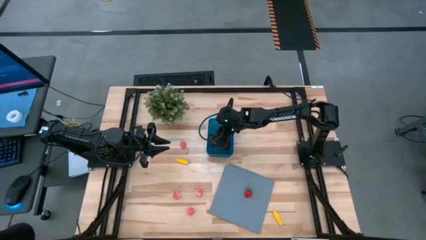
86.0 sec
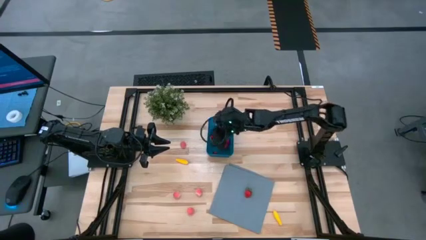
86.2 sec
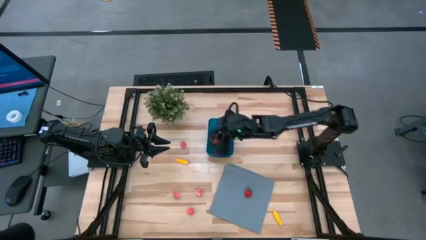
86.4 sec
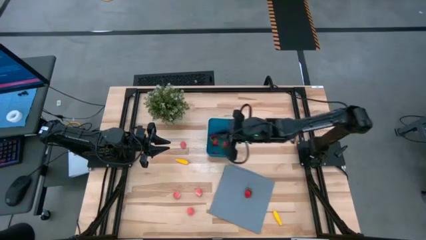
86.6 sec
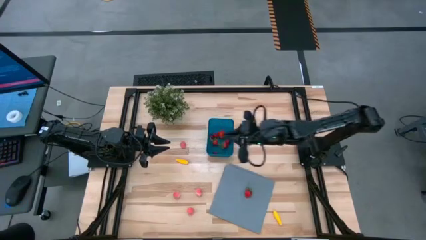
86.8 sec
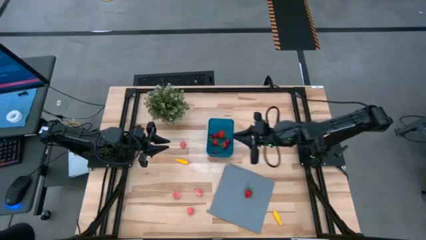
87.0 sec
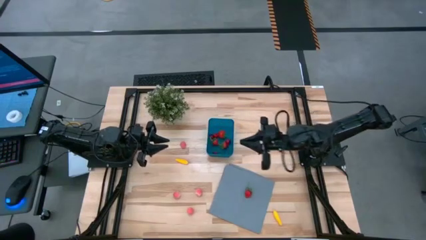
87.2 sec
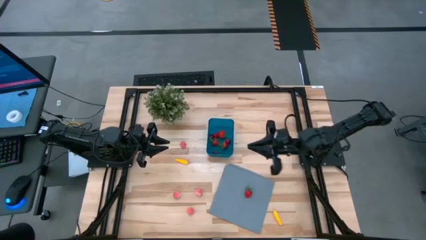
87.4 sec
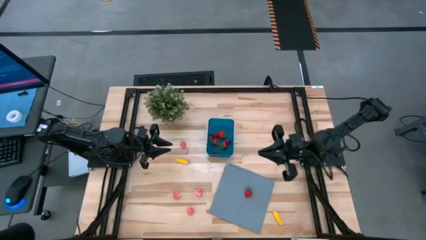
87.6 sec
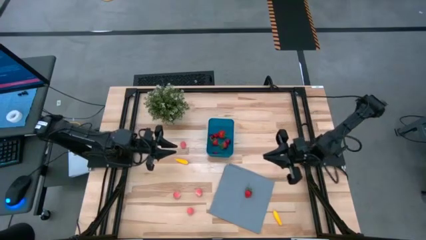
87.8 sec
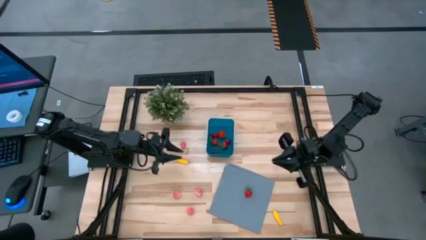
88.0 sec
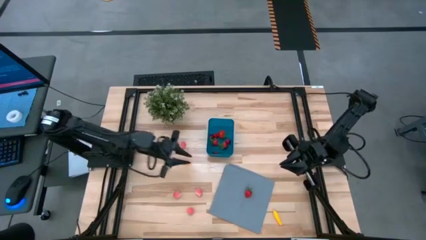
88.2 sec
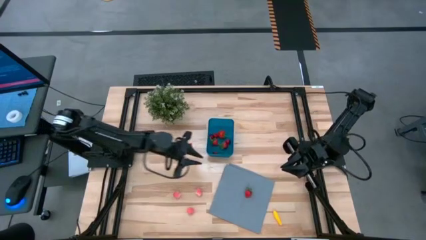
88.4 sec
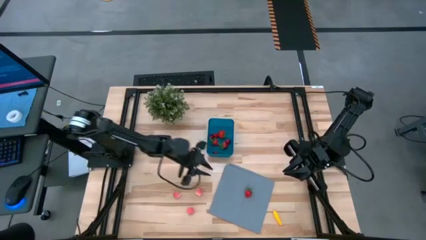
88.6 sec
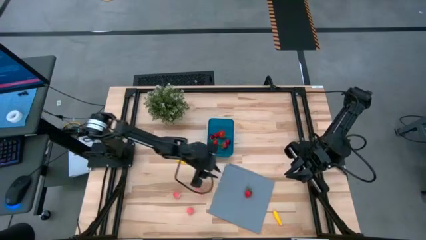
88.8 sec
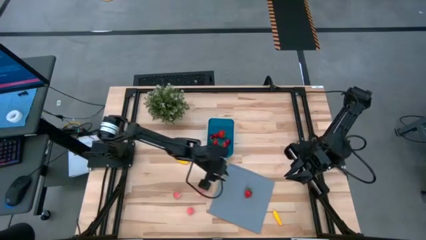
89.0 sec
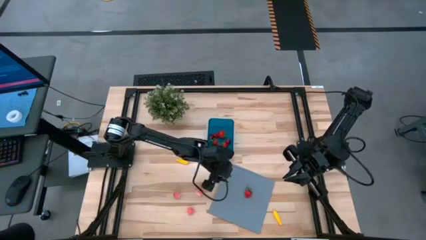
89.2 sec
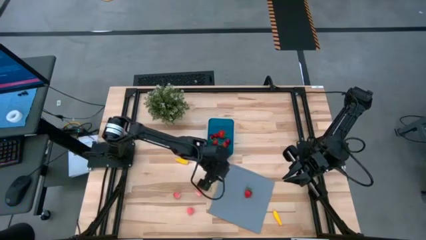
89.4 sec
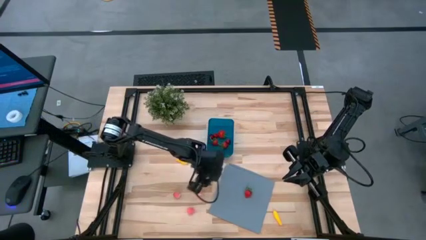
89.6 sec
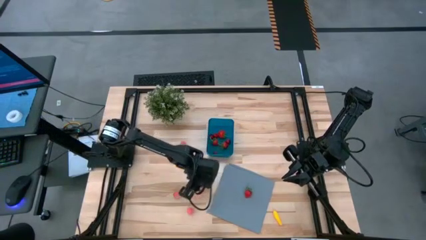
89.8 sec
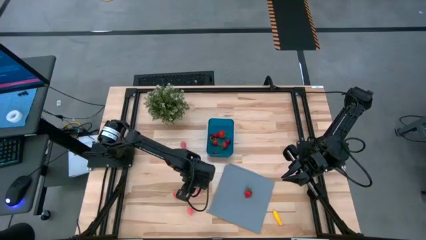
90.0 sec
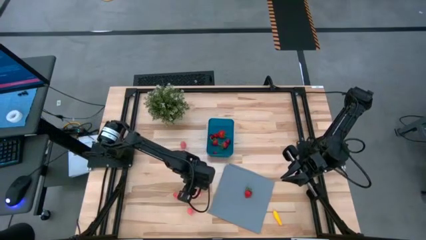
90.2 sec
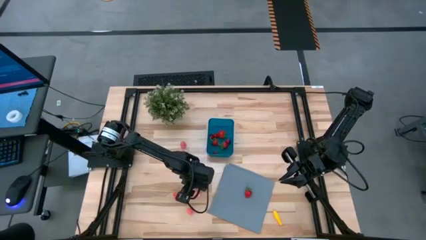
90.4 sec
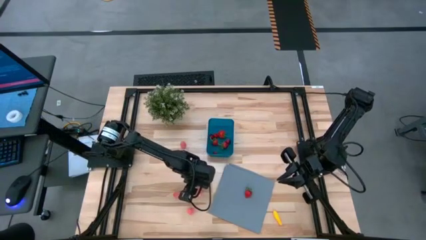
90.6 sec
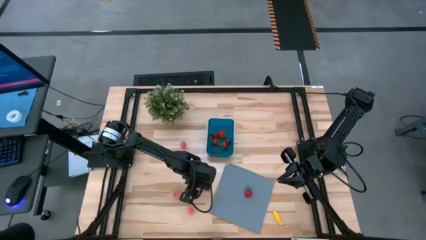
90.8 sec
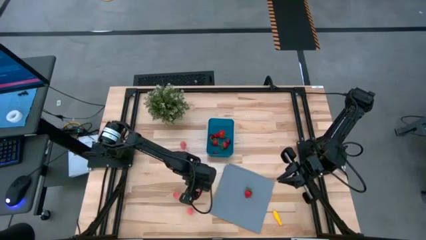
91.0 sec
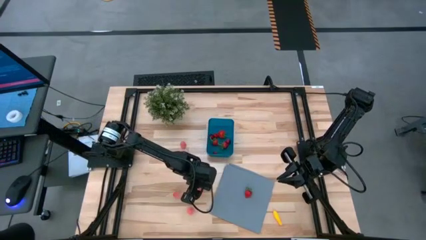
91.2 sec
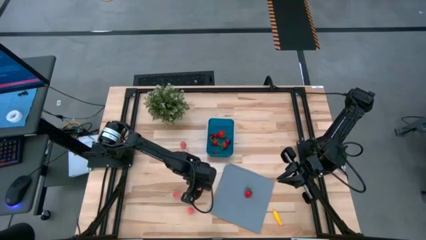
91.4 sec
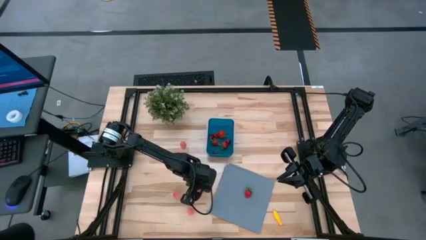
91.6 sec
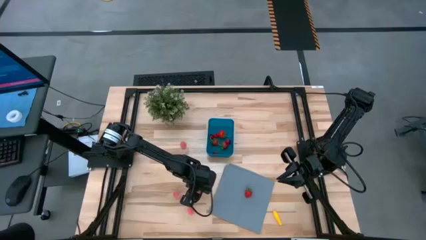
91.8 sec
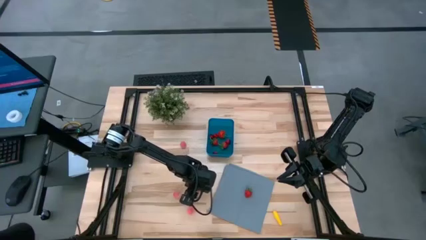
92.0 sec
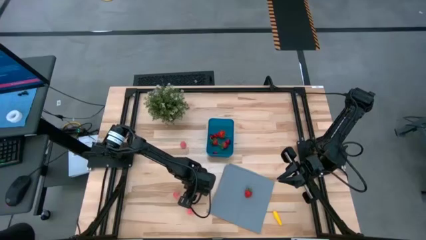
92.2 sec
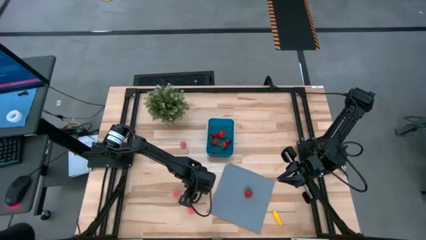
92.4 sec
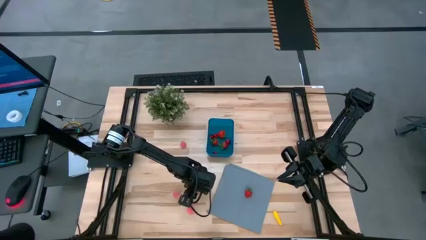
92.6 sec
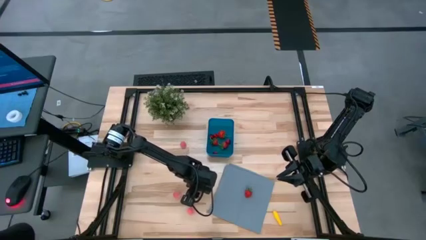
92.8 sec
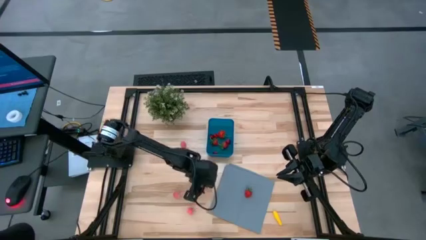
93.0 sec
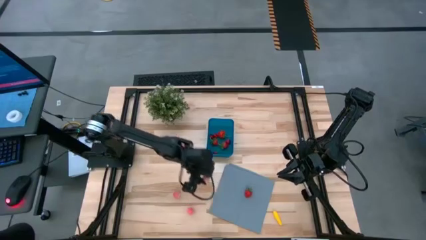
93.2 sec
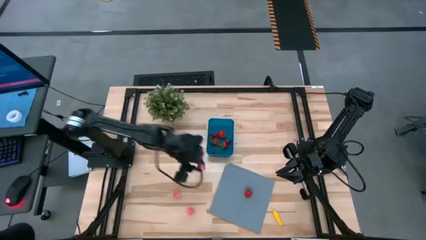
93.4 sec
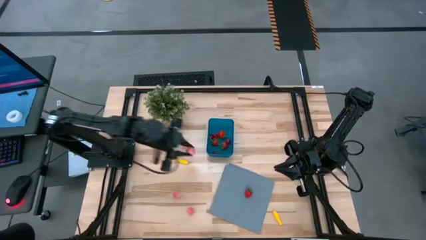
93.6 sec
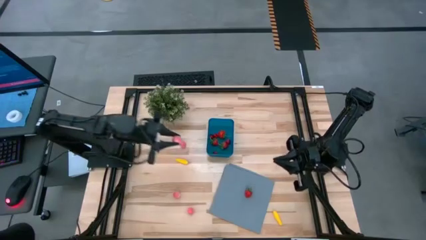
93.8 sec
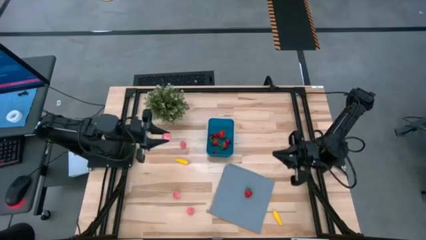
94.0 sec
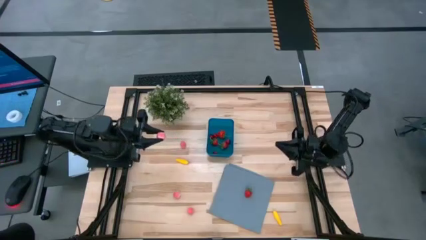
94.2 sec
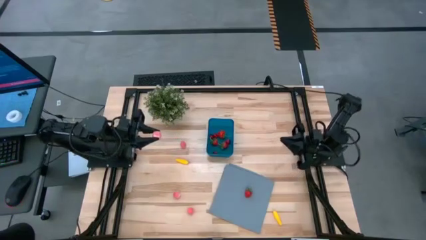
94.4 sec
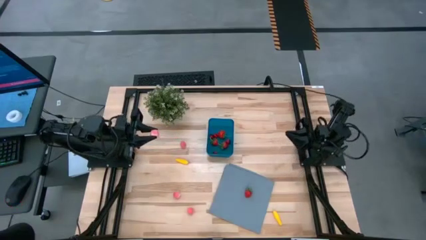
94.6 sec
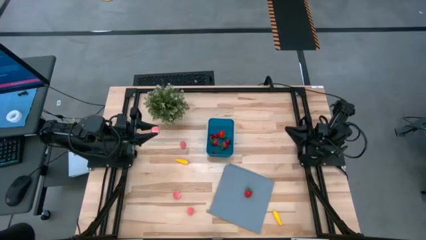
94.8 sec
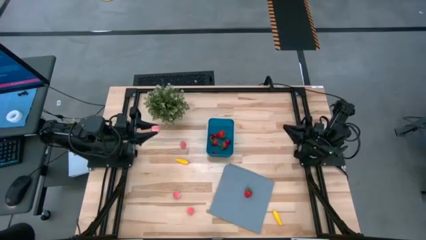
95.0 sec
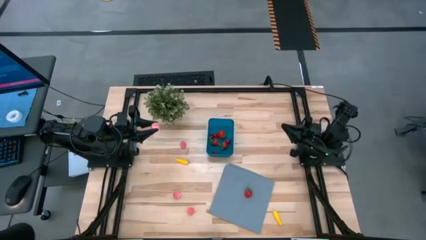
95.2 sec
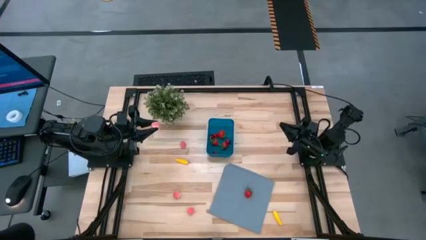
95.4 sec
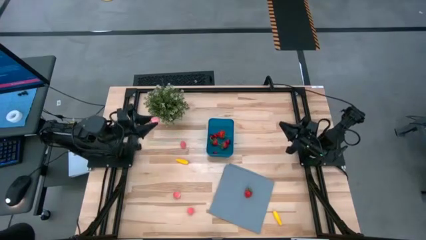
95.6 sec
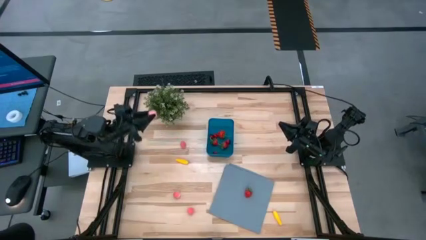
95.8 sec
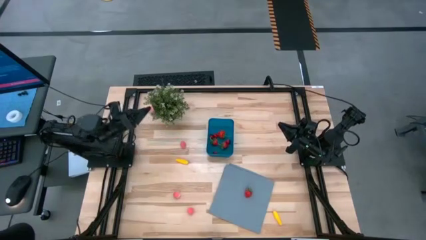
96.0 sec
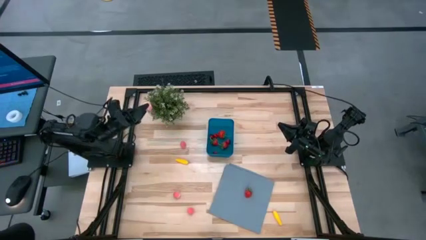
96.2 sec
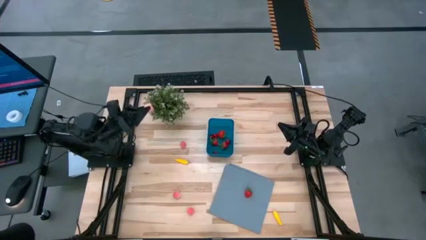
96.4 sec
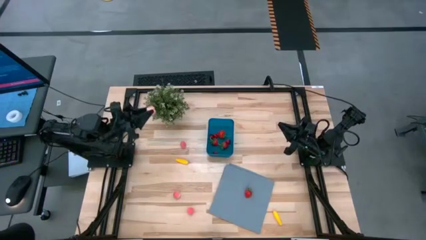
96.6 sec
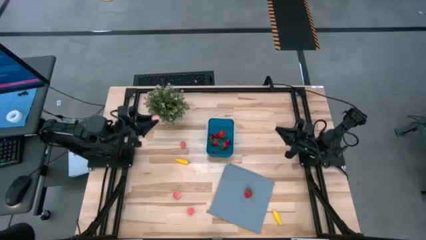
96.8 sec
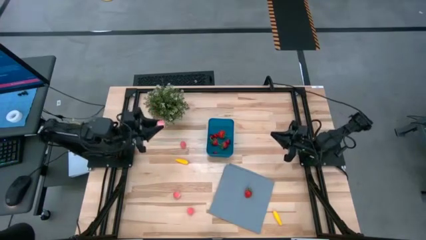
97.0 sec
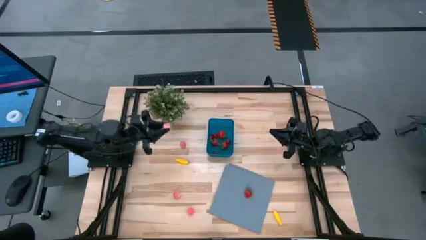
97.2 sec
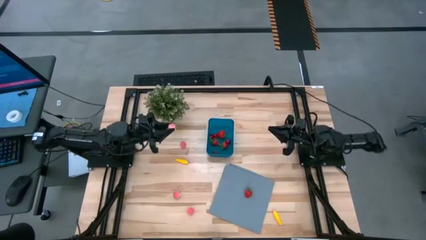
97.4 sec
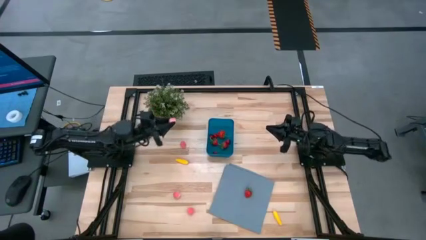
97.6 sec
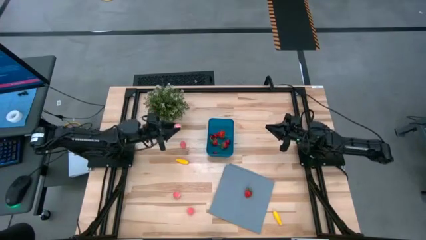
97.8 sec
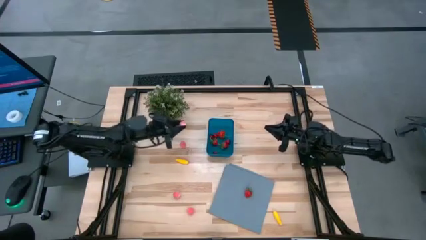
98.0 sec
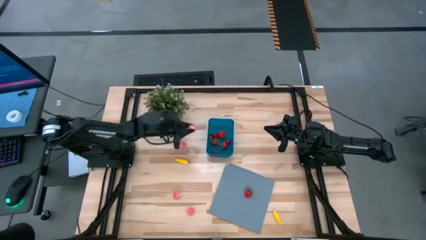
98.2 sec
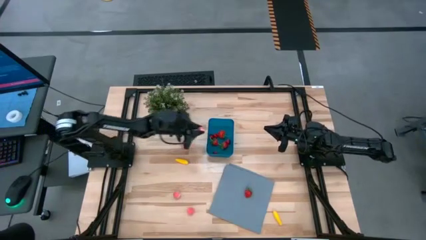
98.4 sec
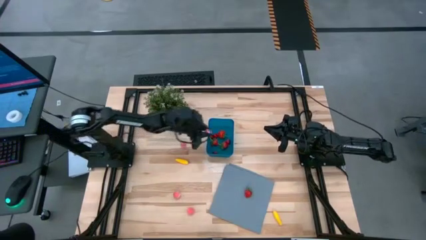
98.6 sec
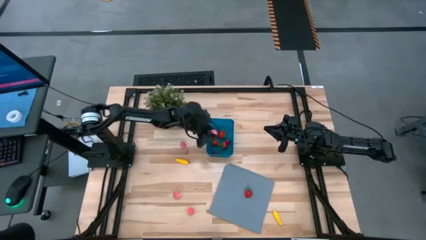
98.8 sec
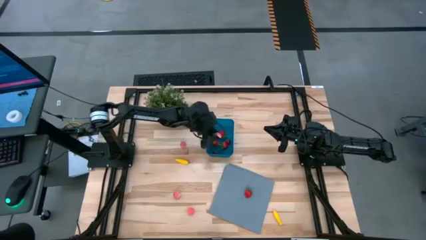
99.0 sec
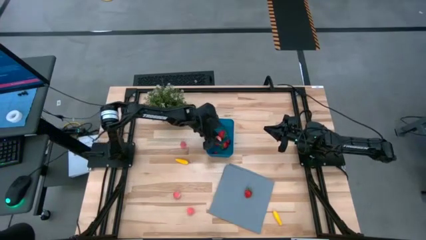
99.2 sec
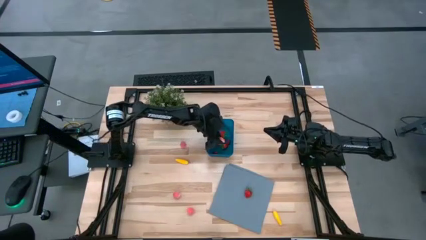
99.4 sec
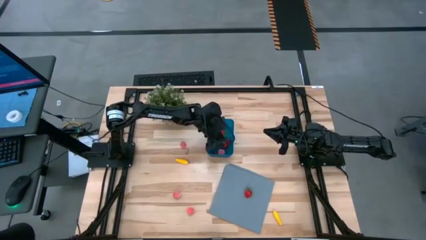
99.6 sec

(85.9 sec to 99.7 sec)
Task: Pick and placing Produce into tupperware
Put the peach into the blue bin

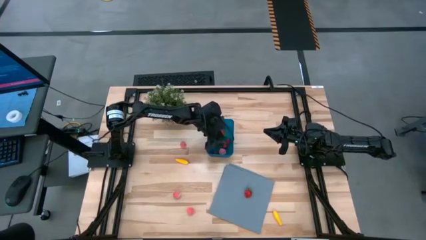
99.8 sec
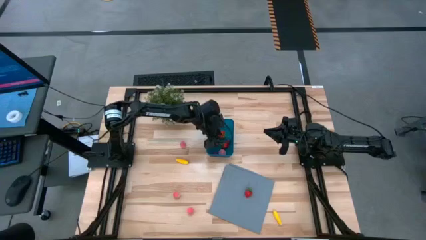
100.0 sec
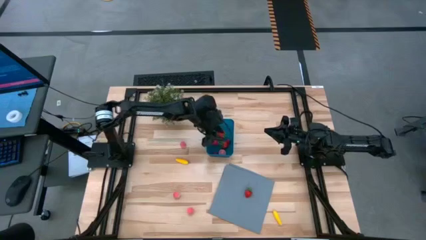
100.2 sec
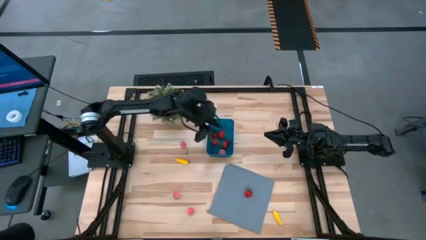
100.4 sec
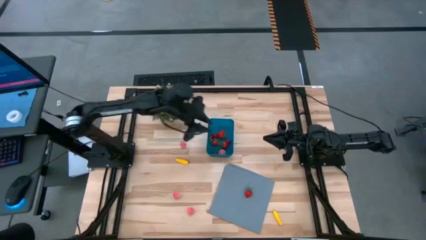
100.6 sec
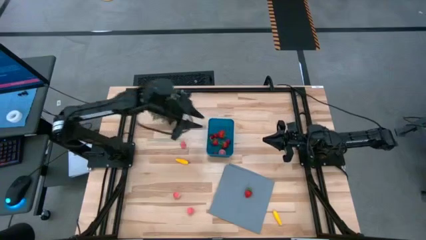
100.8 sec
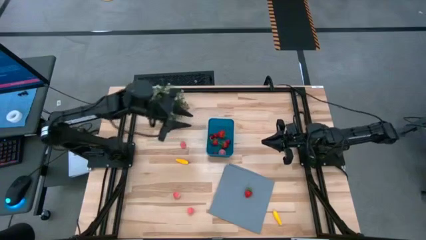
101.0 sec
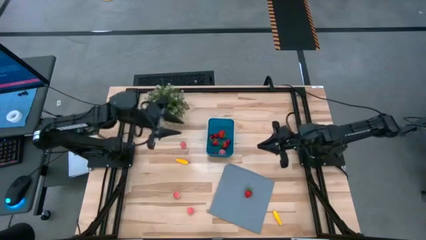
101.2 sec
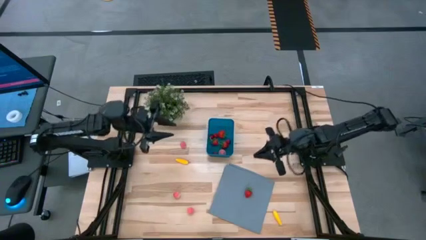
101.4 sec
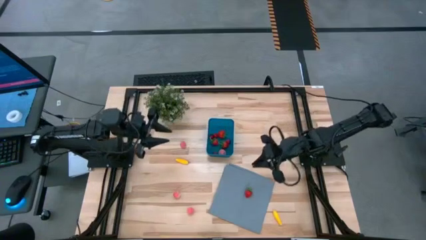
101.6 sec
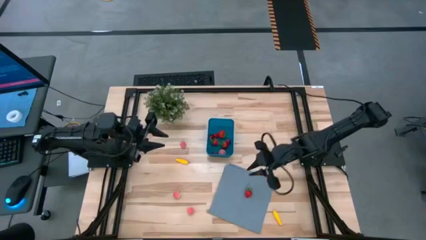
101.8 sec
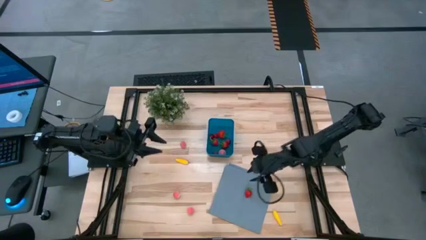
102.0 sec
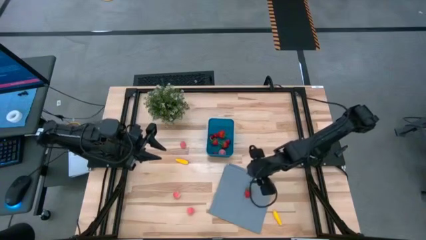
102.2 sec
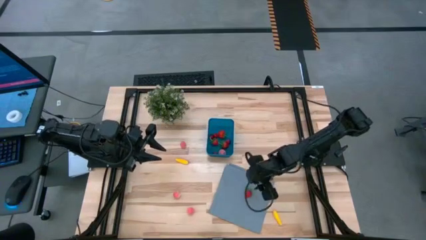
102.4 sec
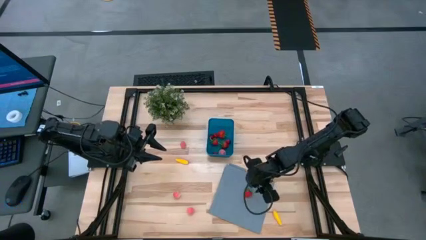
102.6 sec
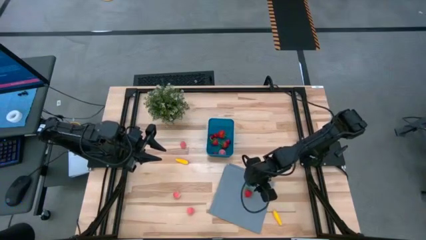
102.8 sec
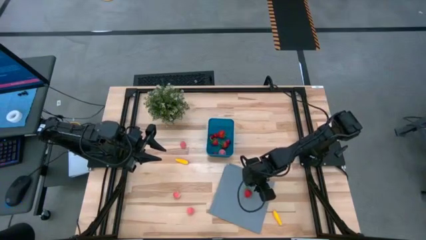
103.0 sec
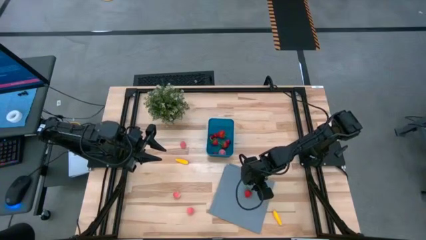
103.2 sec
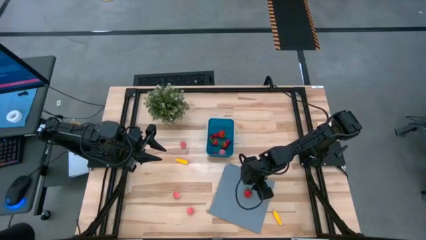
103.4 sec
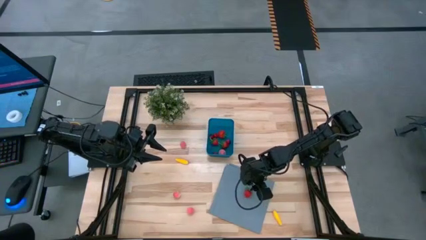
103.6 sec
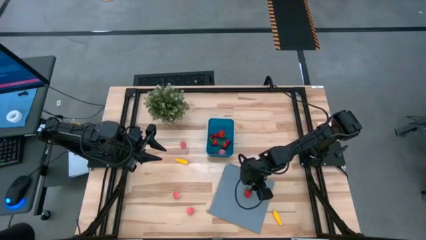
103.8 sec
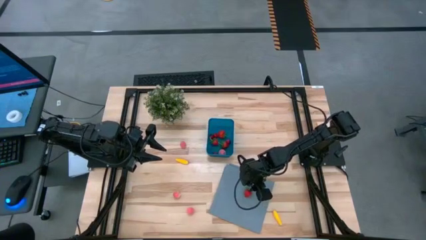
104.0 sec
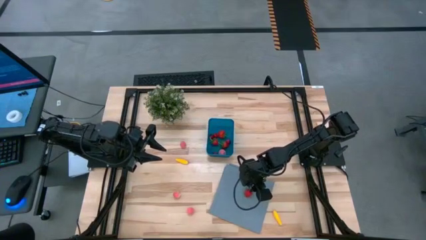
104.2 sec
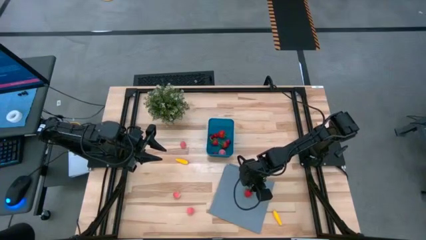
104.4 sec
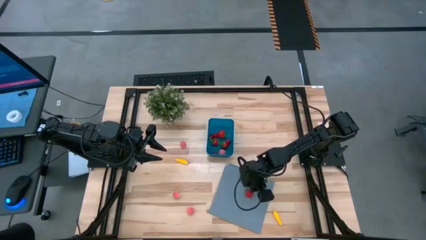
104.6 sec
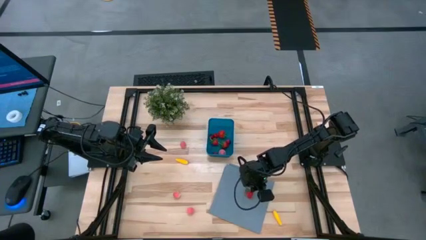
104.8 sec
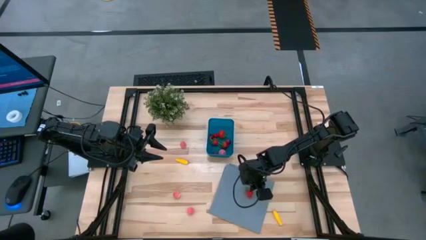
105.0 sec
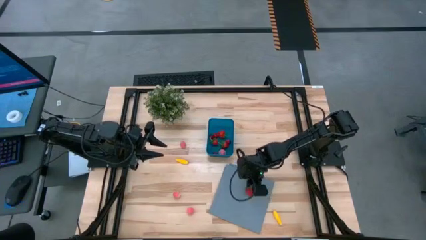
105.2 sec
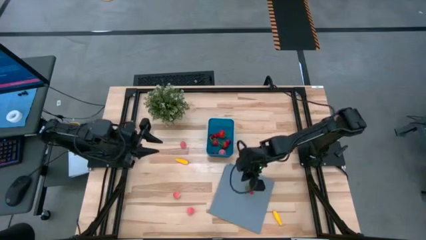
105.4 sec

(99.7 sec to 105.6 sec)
Put the strawberry into the blue bin
